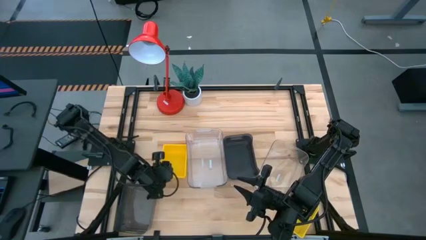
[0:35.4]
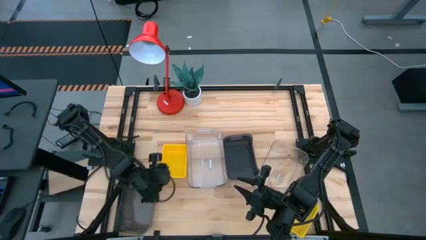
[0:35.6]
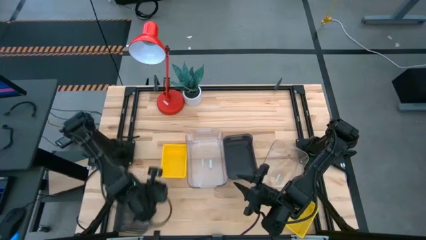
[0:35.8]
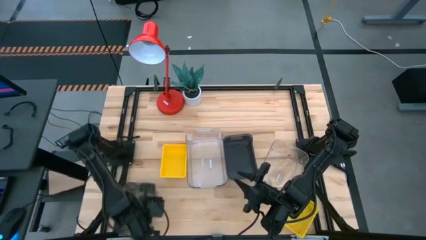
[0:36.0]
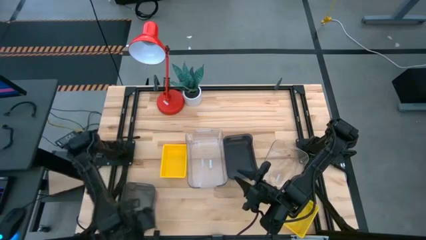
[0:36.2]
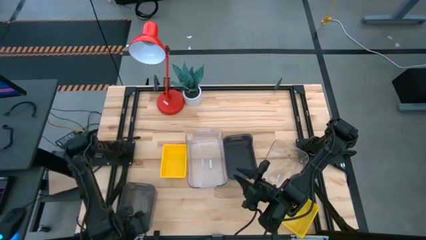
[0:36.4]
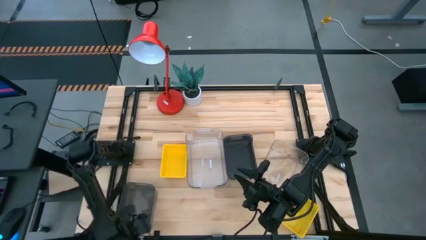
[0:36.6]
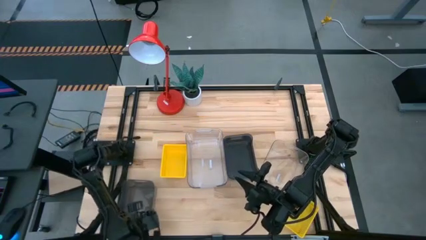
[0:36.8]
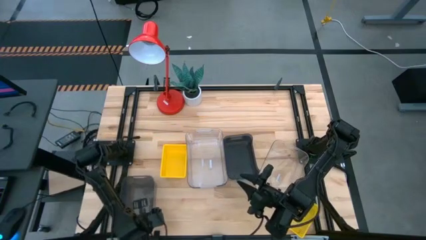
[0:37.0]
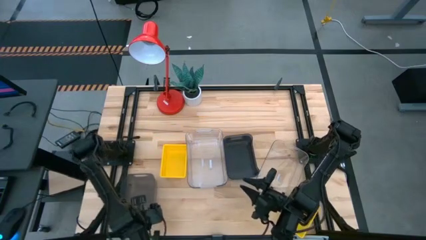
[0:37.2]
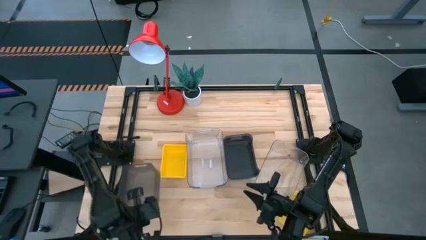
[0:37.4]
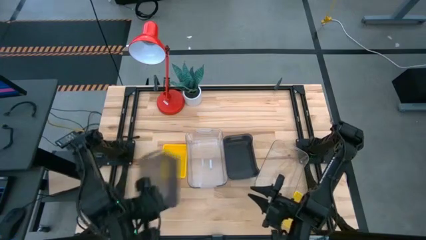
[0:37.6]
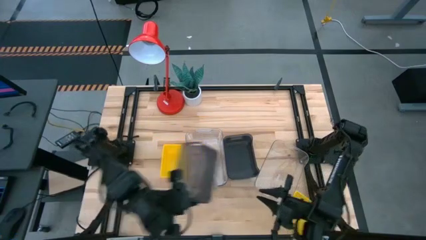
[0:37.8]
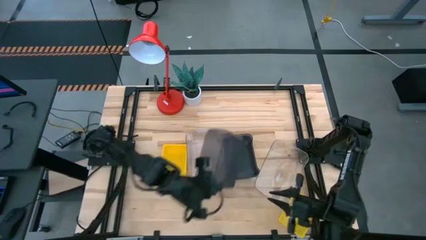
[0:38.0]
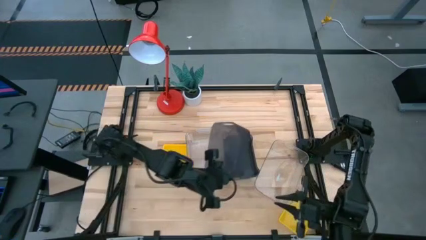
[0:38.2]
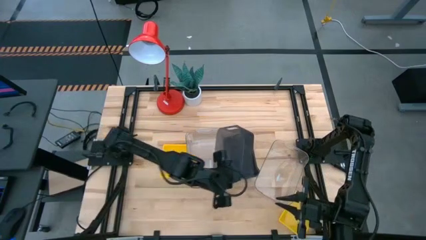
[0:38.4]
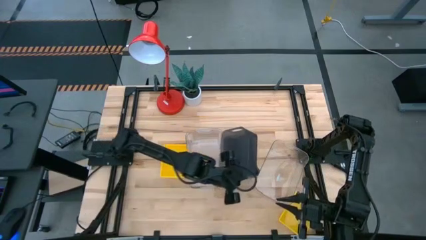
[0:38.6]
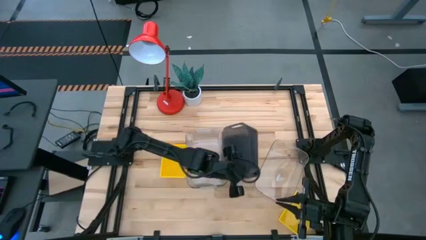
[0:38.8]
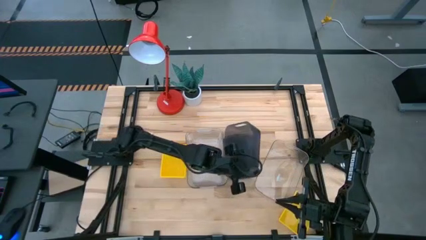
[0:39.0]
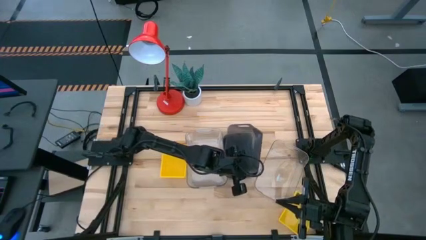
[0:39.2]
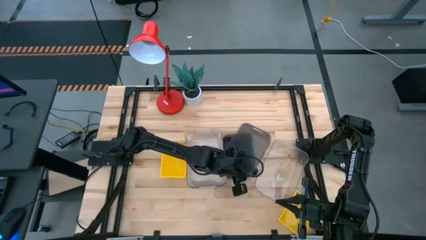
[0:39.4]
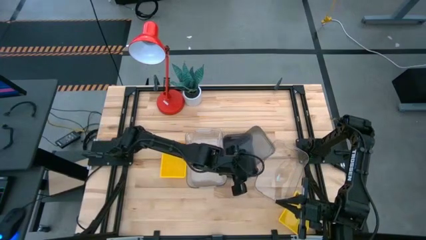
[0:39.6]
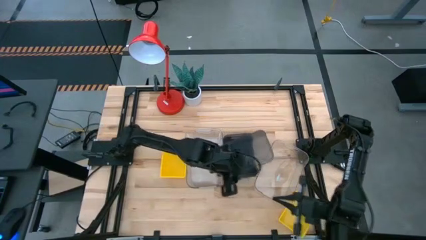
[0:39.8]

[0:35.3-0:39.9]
Stack the black bin on the middle right black bin

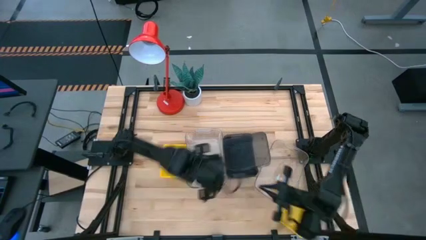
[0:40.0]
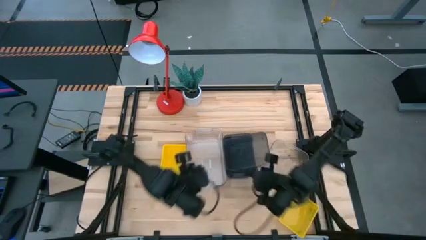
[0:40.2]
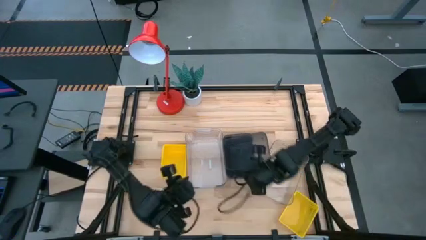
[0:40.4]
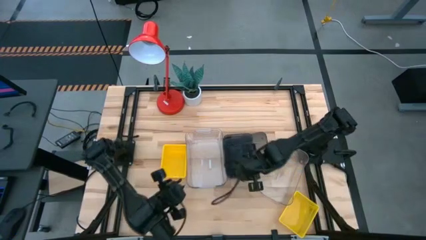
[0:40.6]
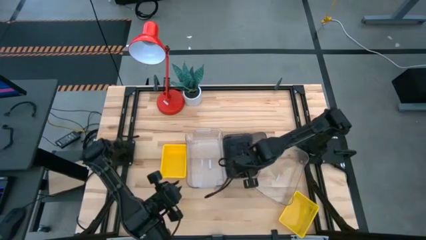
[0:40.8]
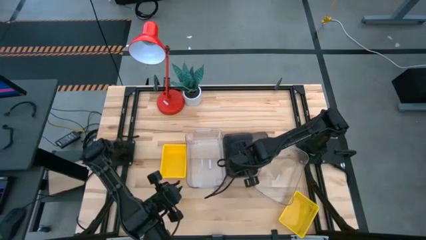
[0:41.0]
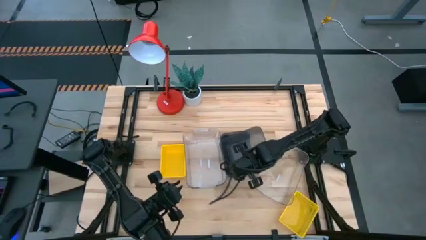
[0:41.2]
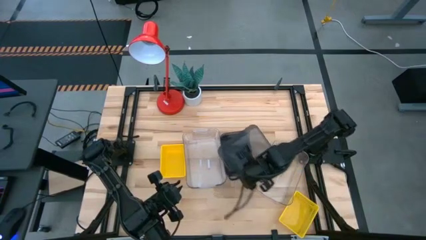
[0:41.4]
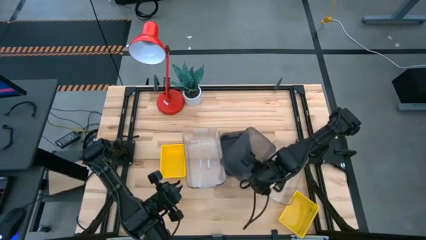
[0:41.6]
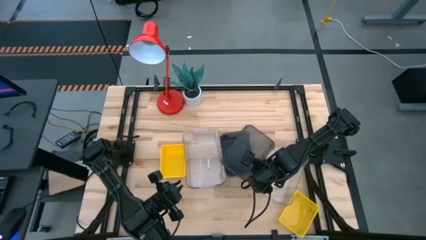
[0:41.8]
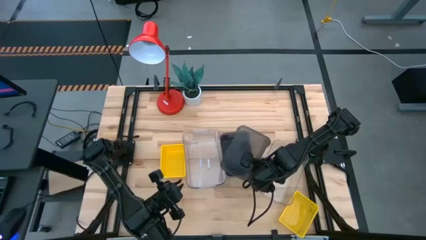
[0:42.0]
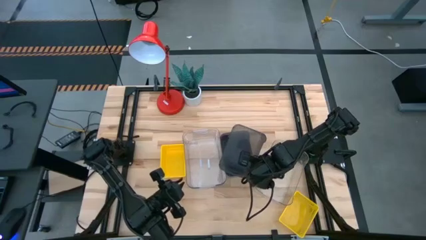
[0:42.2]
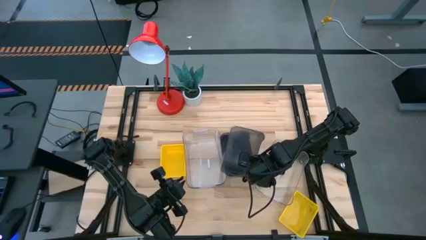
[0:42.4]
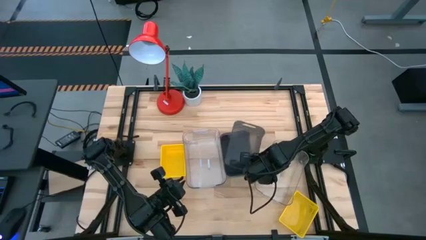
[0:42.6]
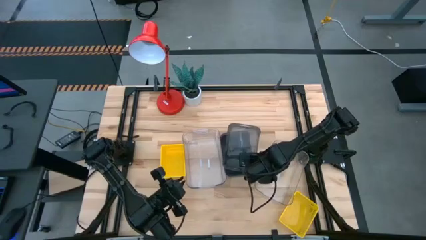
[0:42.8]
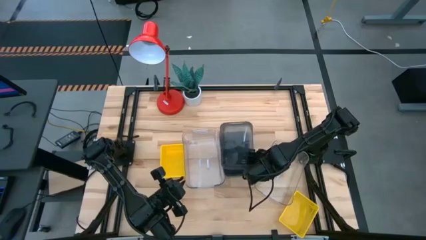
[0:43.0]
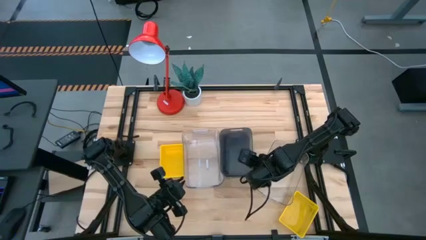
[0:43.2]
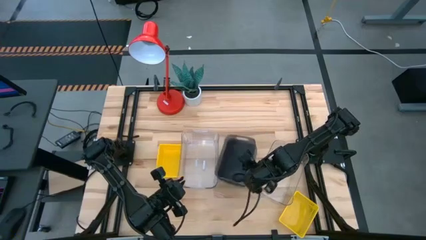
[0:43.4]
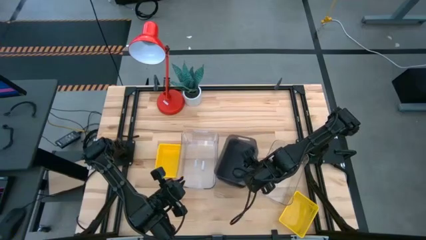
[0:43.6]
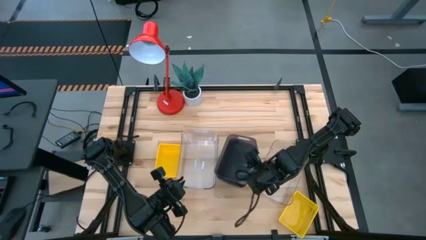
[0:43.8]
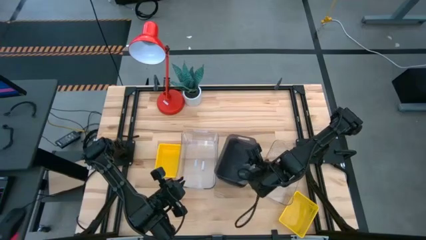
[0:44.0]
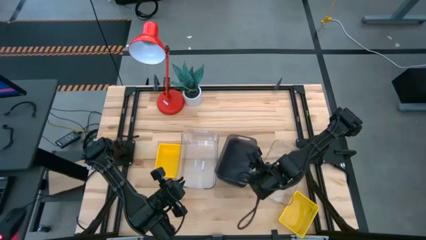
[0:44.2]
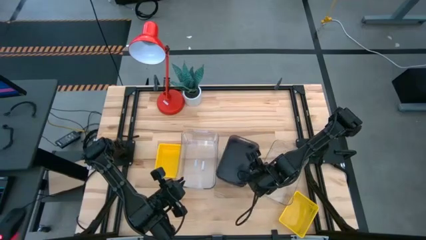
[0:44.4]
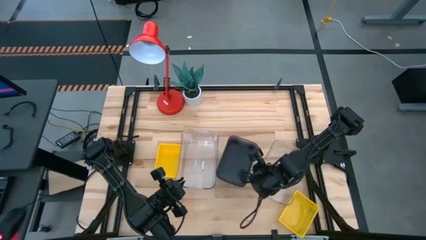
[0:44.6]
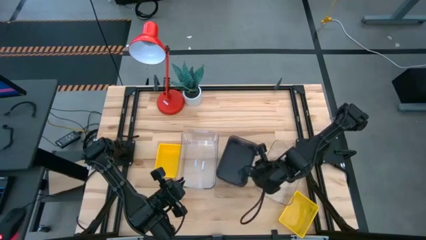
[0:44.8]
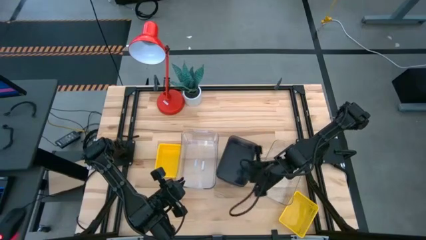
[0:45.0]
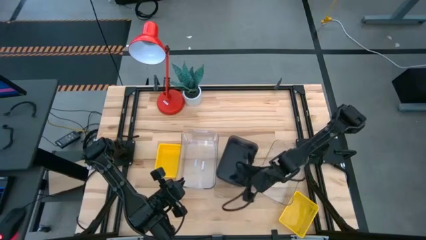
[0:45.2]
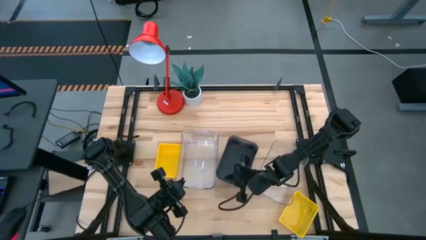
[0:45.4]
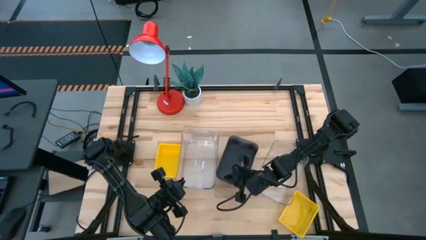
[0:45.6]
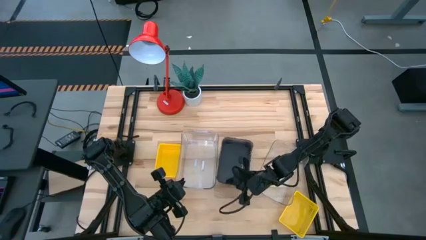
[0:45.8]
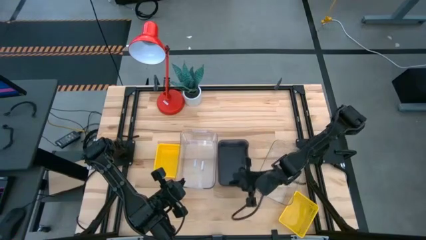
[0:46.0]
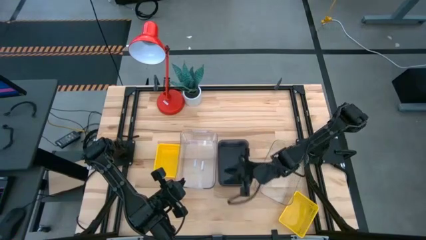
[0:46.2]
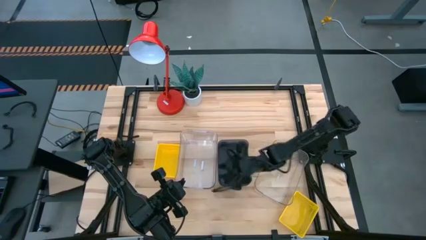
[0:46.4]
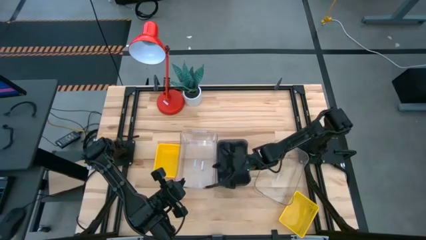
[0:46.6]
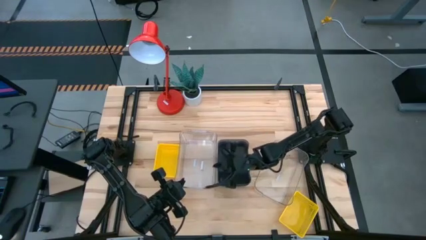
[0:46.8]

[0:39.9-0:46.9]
Stack the black bin on the middle right black bin

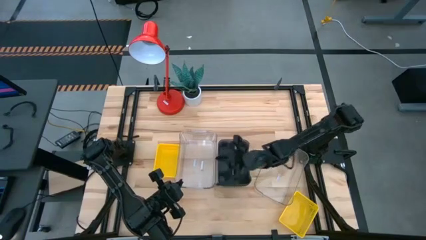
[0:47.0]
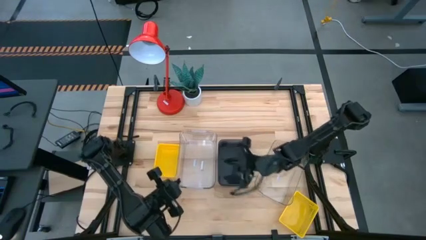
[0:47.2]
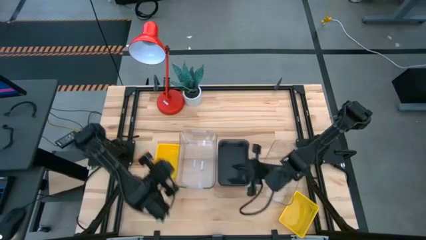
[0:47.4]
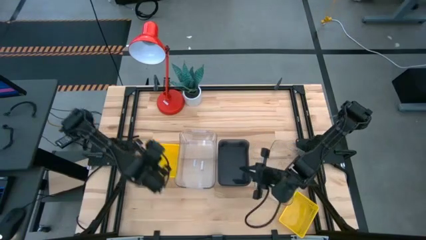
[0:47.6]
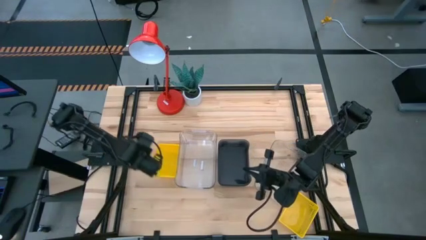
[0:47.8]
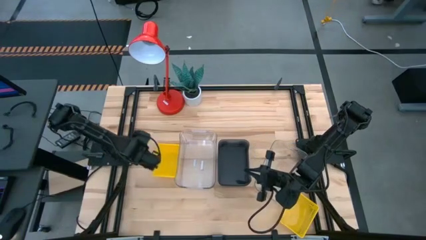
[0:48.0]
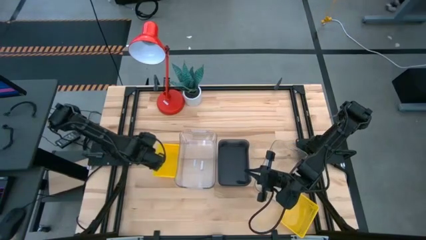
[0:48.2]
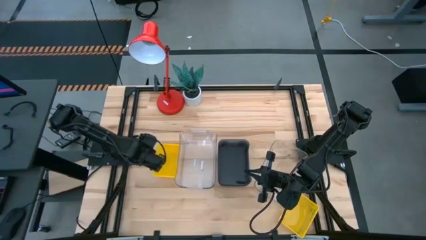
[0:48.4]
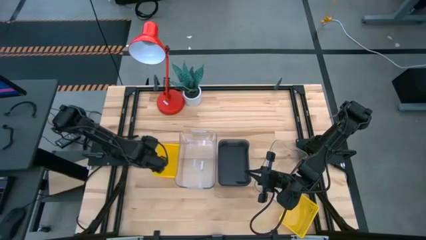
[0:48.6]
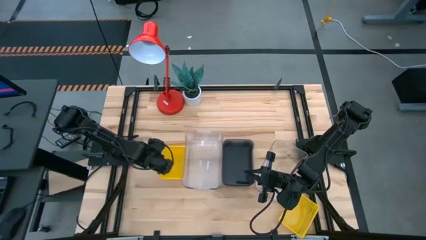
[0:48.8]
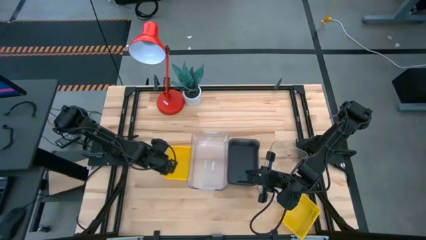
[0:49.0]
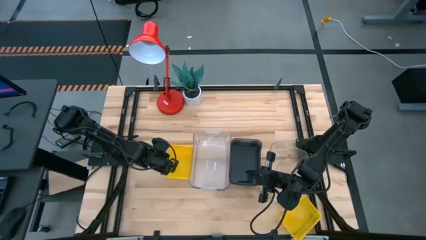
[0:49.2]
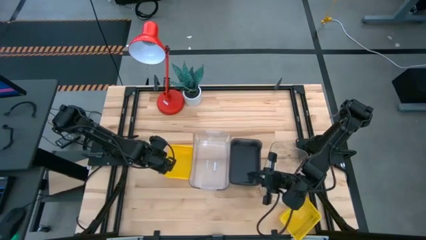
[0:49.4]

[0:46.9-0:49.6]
Adjust the stacked yellow bins on the table

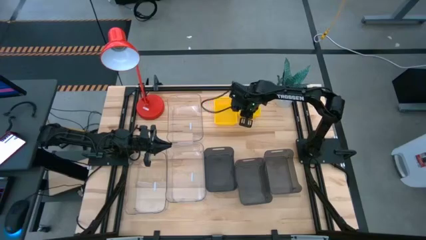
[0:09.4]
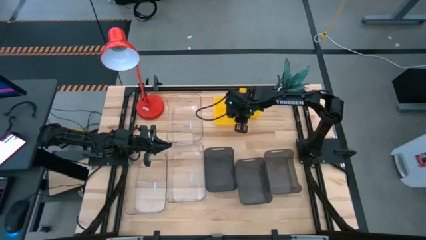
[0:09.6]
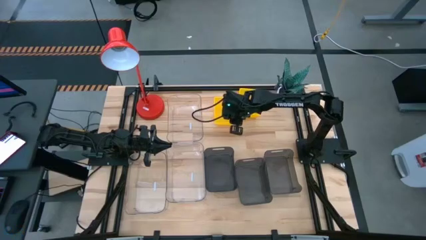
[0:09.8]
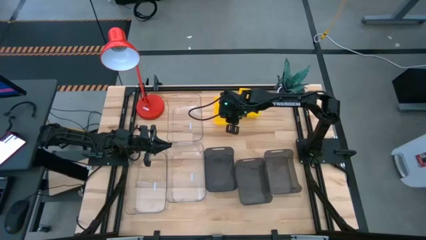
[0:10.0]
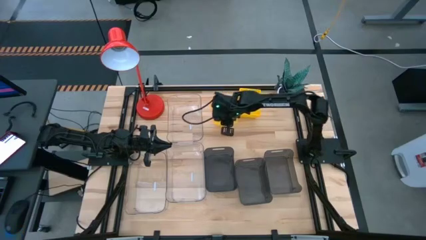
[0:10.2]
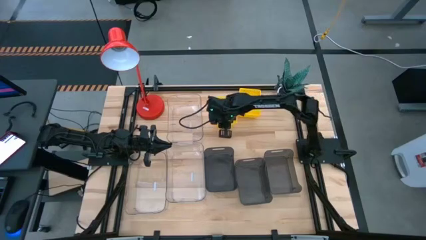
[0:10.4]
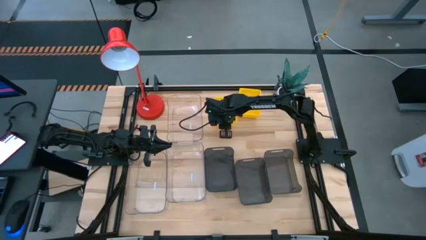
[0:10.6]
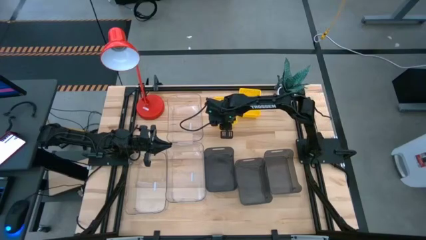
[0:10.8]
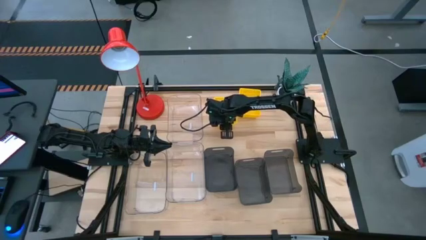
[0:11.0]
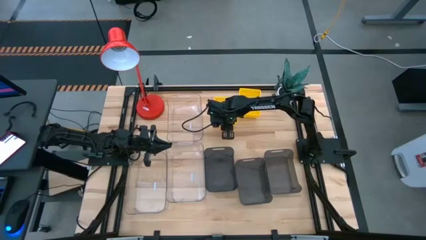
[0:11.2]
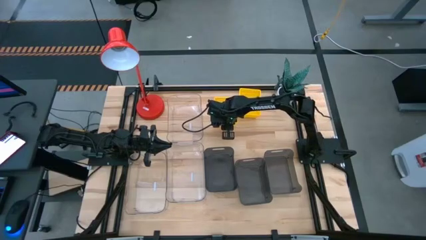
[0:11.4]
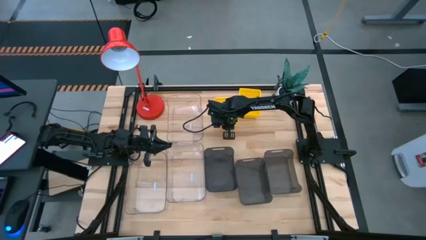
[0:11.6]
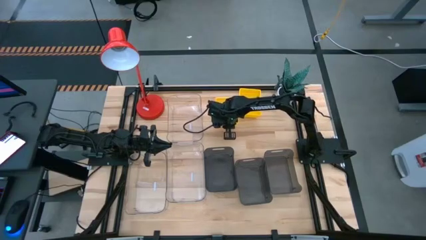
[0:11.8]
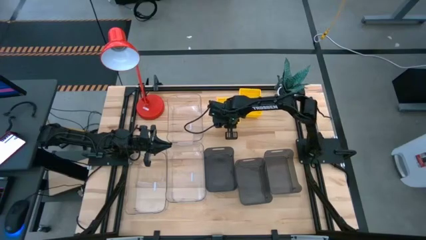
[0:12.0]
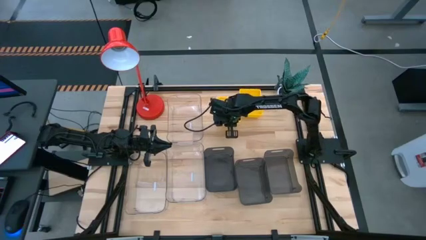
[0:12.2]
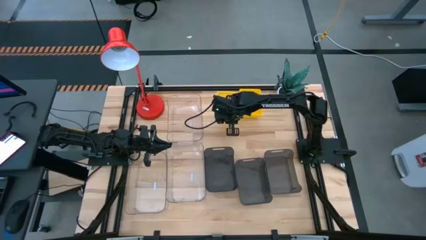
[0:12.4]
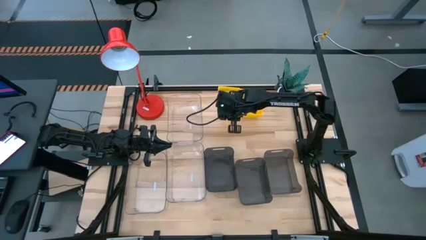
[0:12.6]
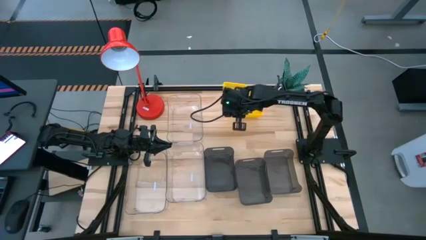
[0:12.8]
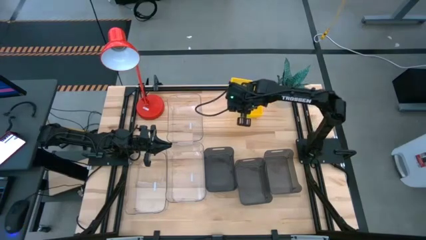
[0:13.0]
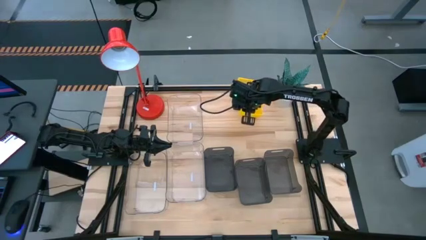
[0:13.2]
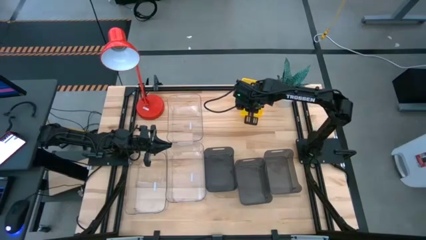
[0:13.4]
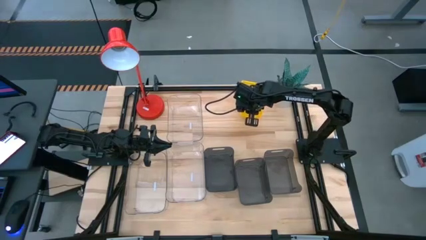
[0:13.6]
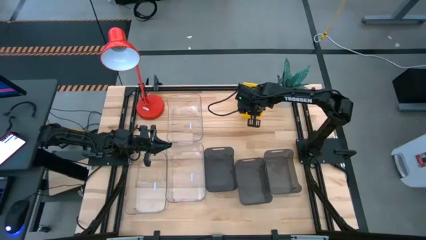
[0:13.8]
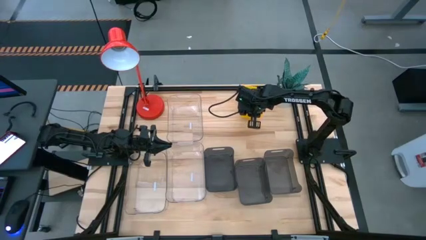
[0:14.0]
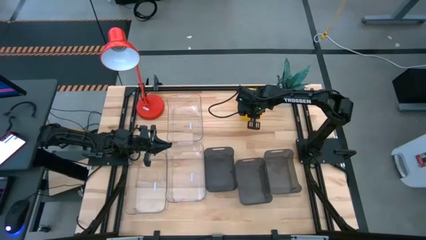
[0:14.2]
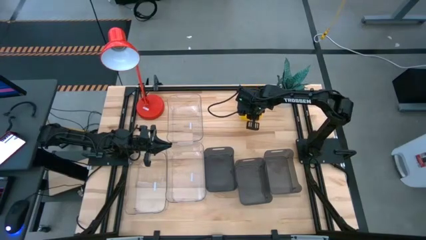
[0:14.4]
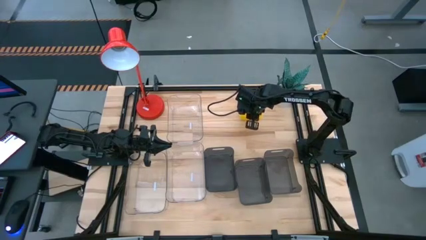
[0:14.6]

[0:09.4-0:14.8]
Stack the left yellow bin on the yellow bins
